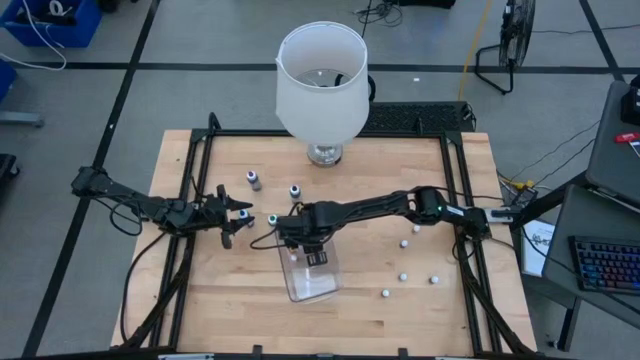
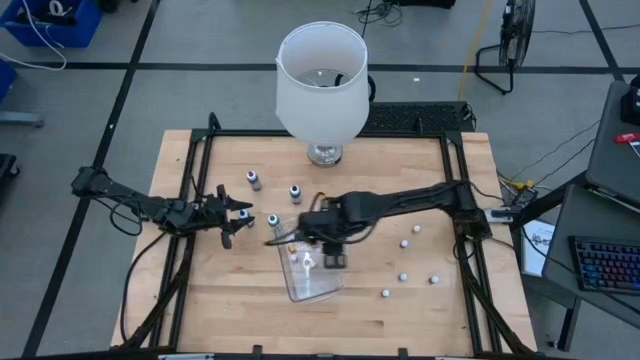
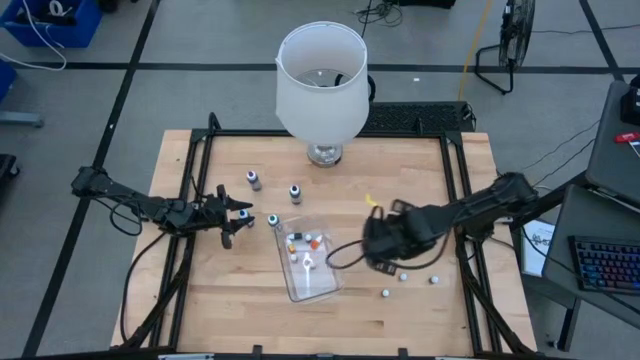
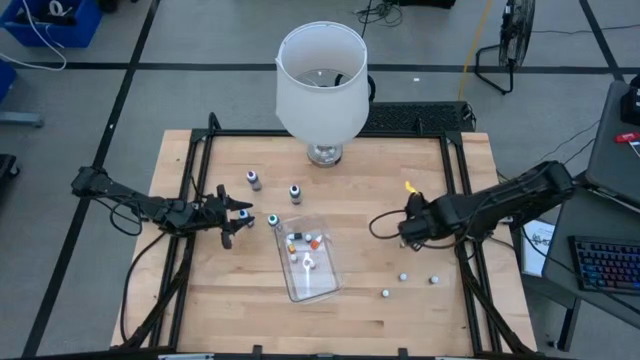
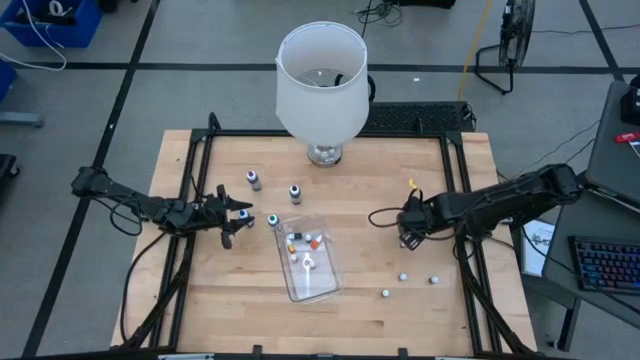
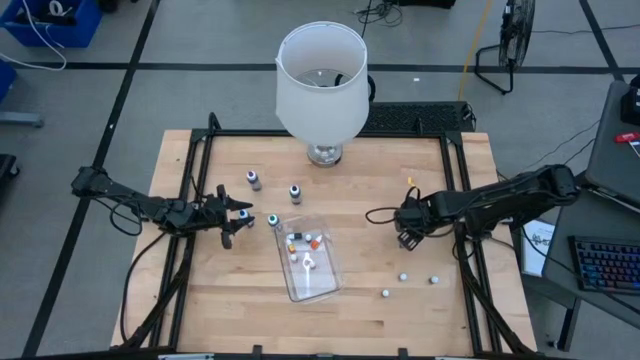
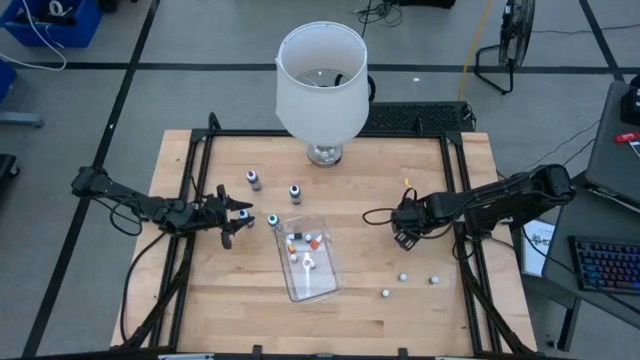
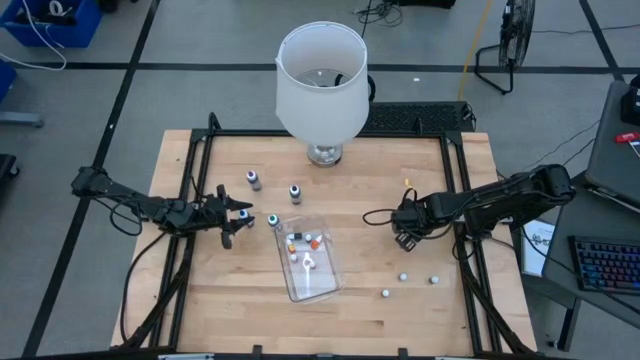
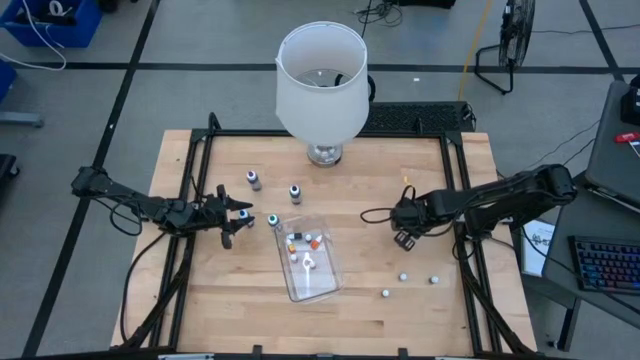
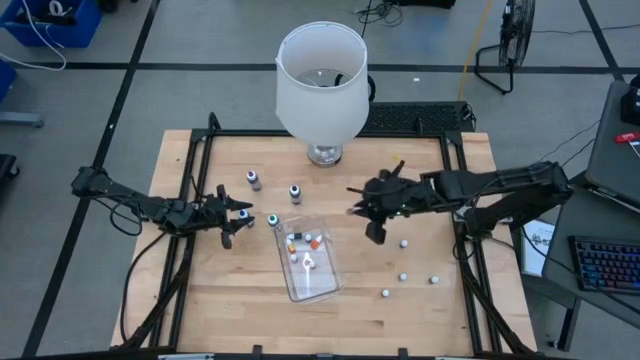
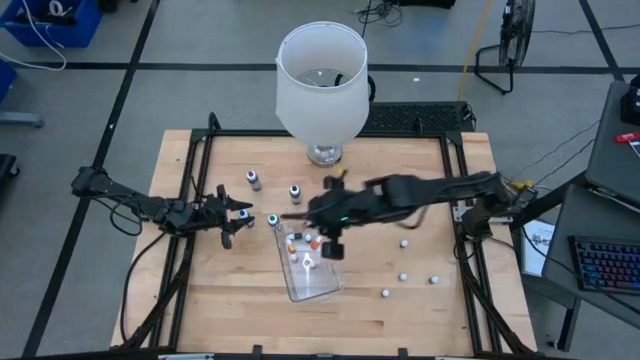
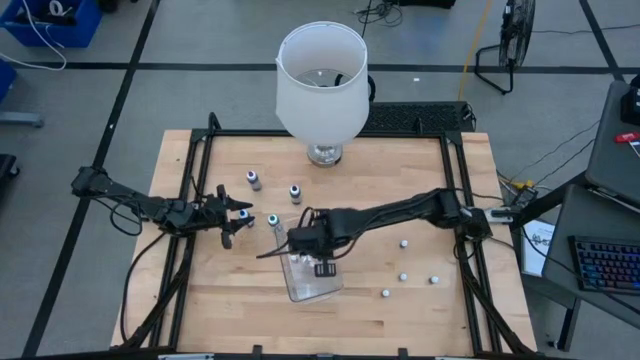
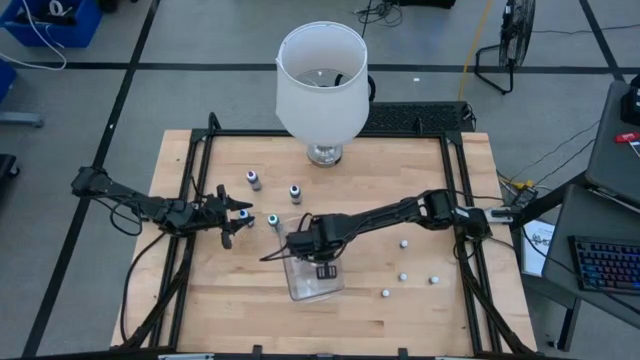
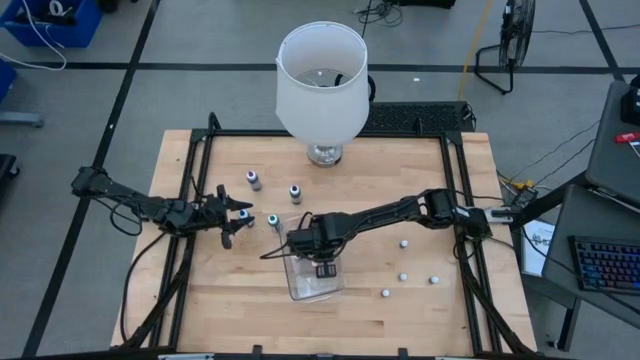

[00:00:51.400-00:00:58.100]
Task: Pick & Place food coloring
Put the orange food coloring bottle into the bin

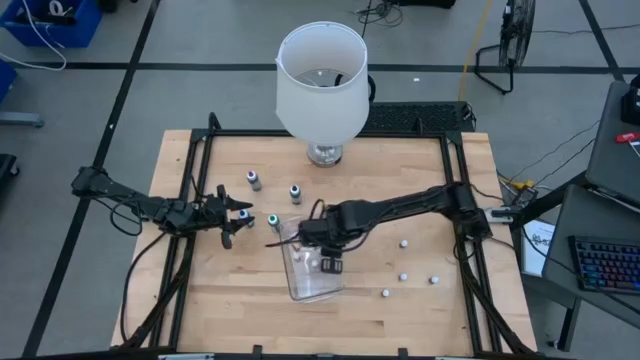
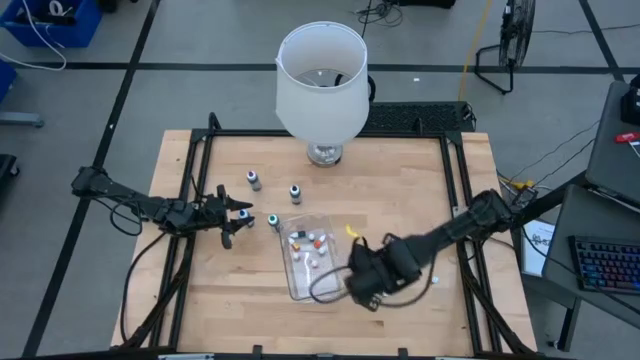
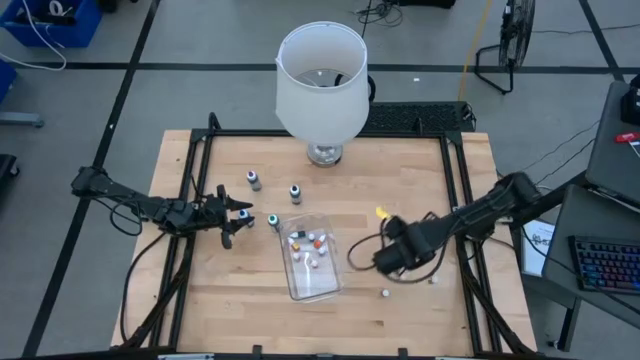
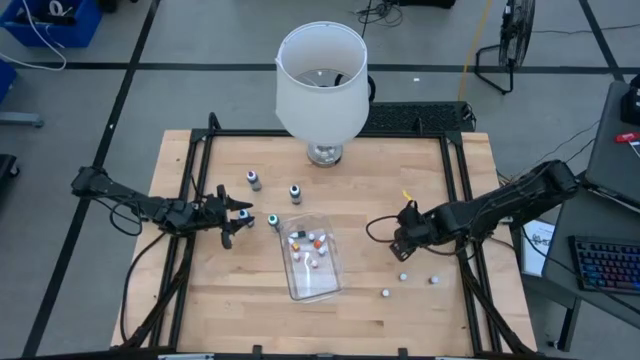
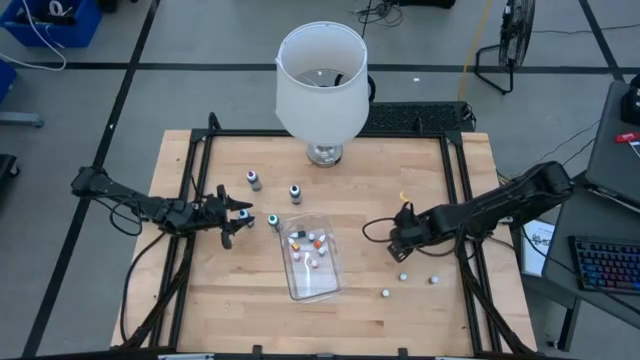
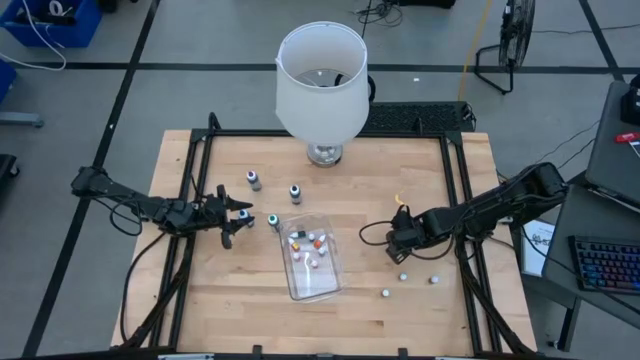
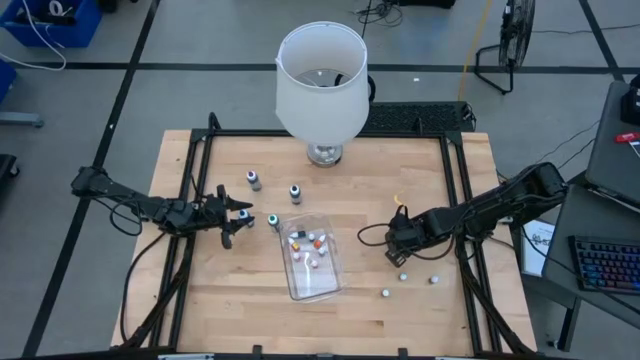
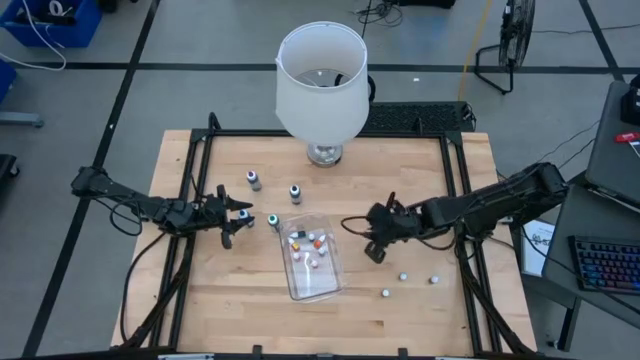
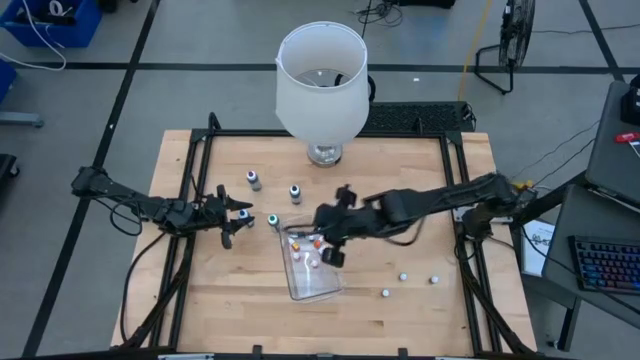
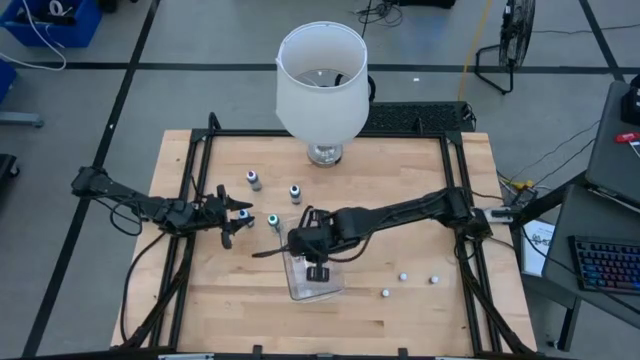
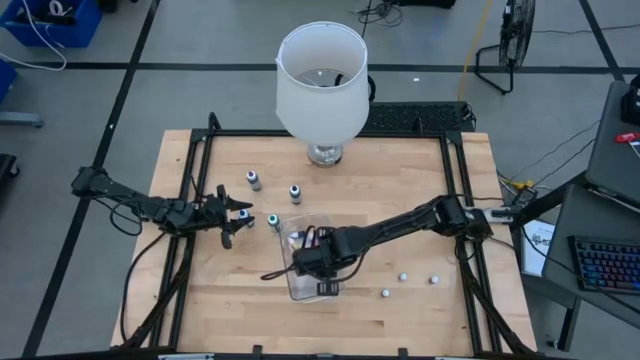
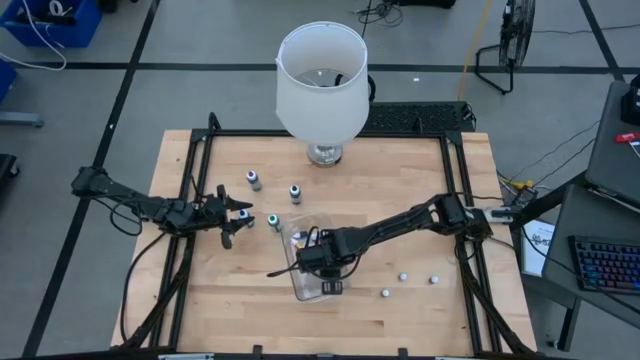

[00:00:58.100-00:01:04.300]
Put the violet food coloring bottle into the bin

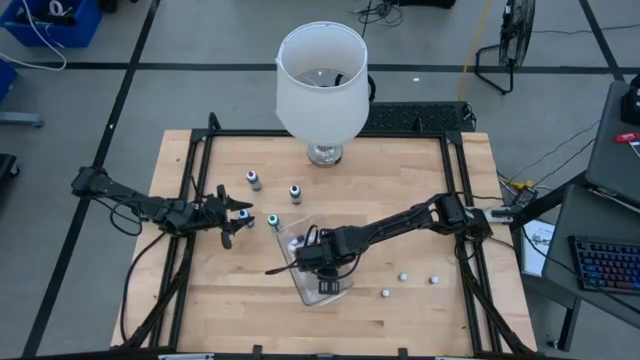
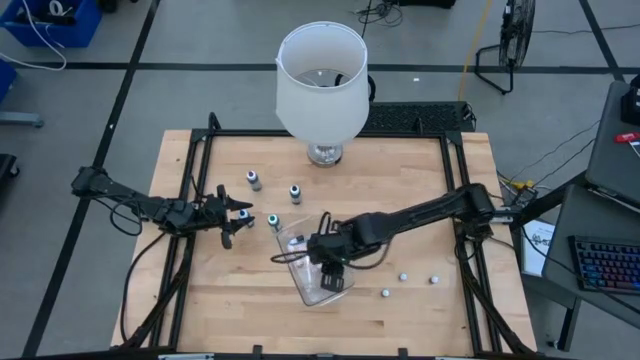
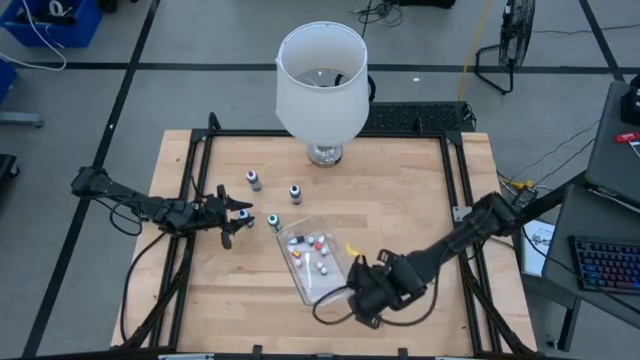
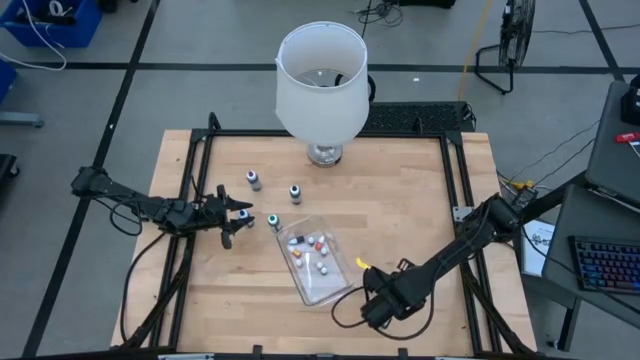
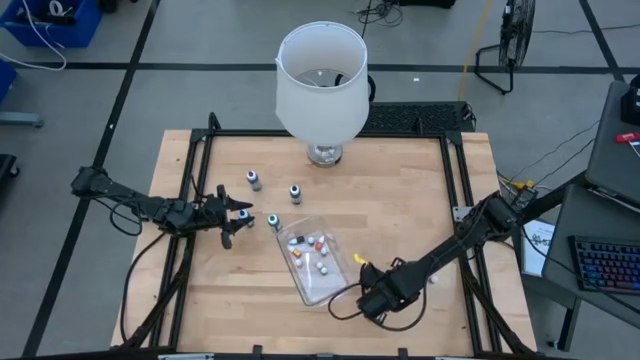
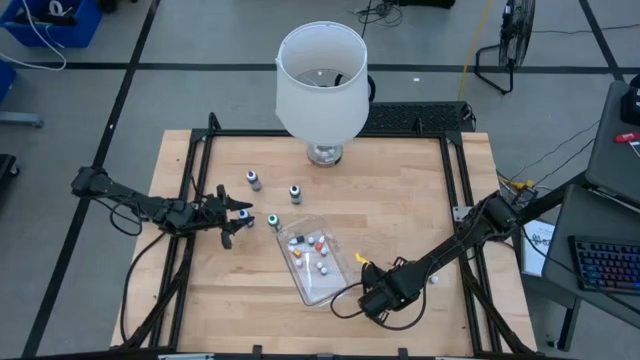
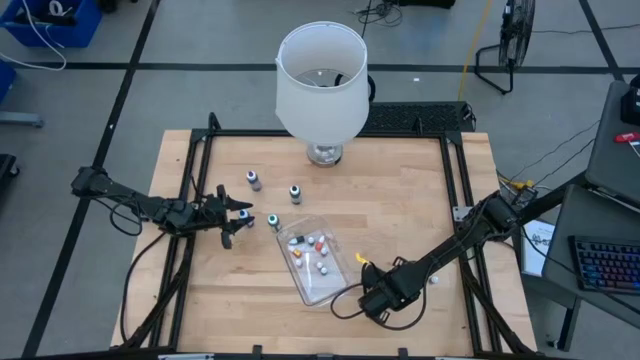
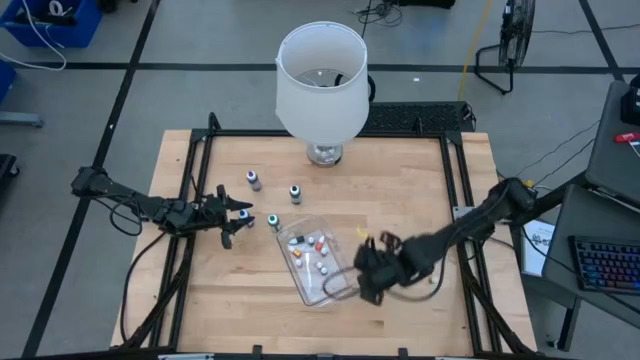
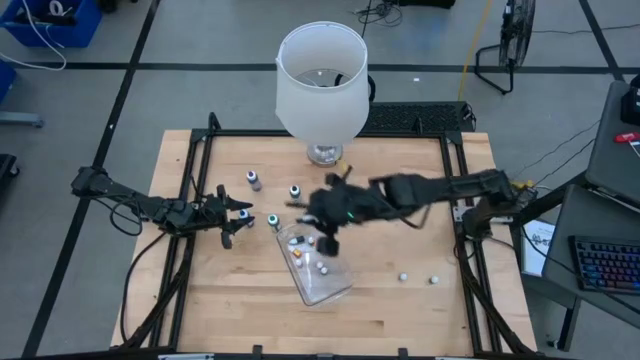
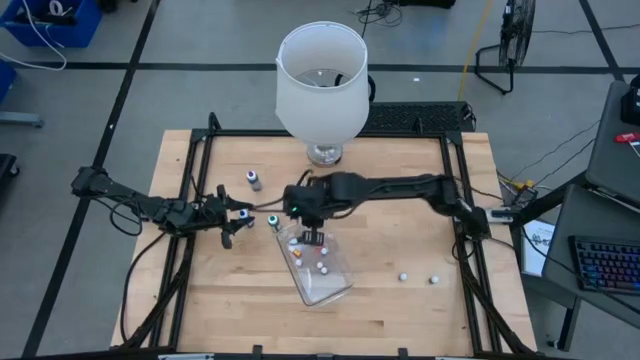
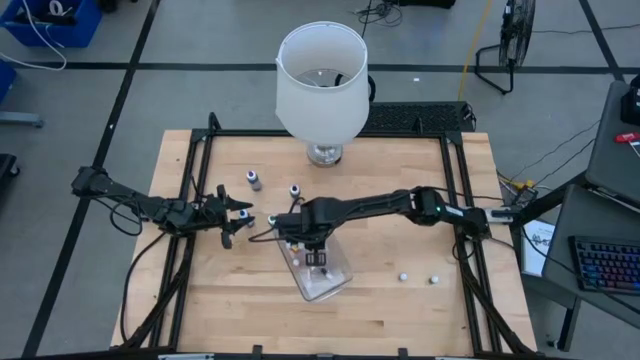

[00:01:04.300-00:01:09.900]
Put the green food coloring bottle into the bin

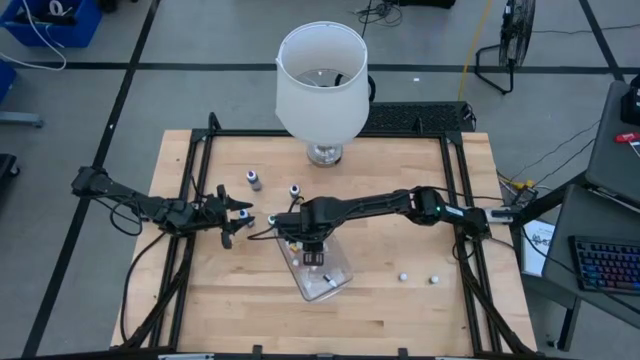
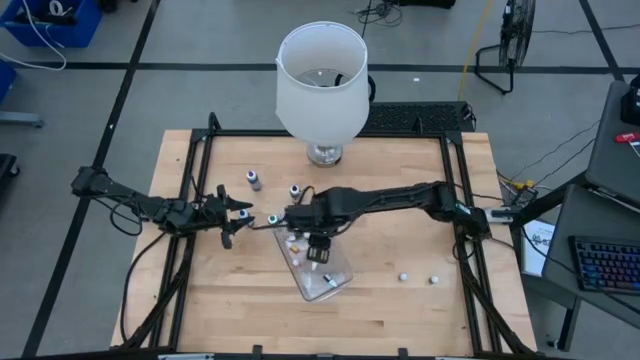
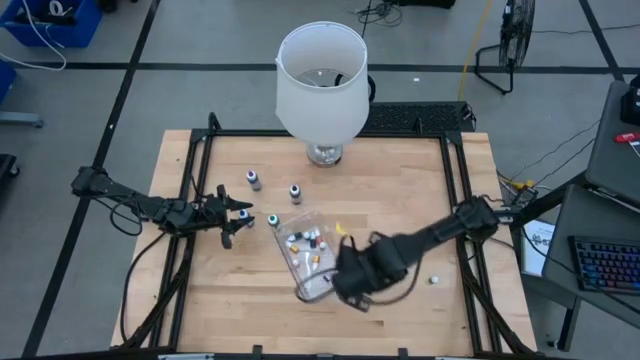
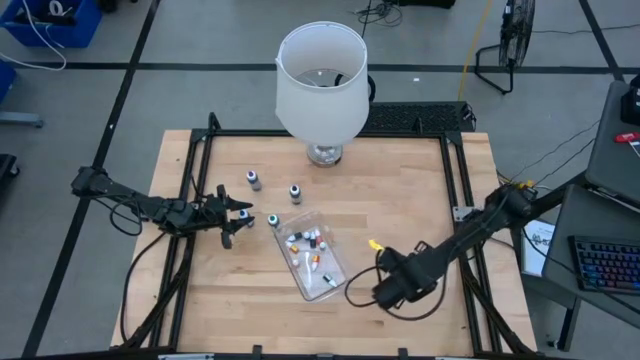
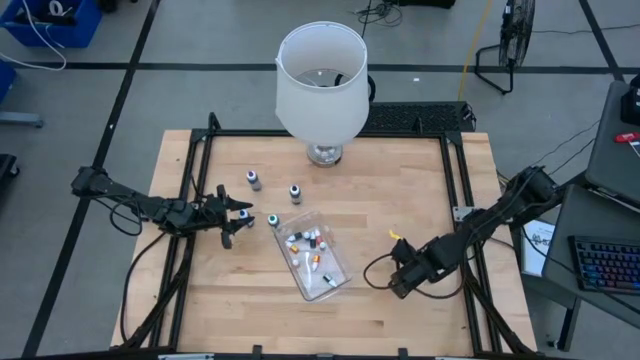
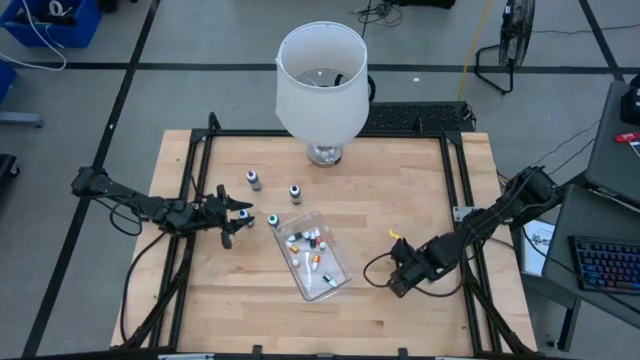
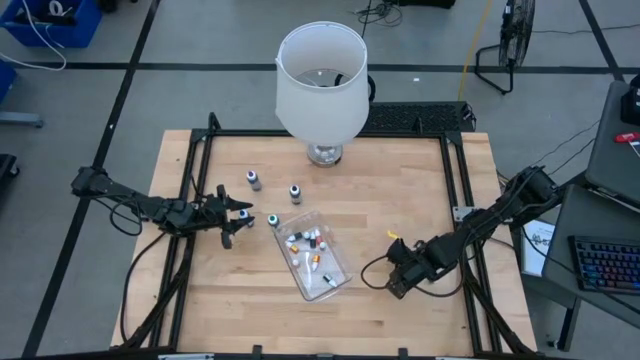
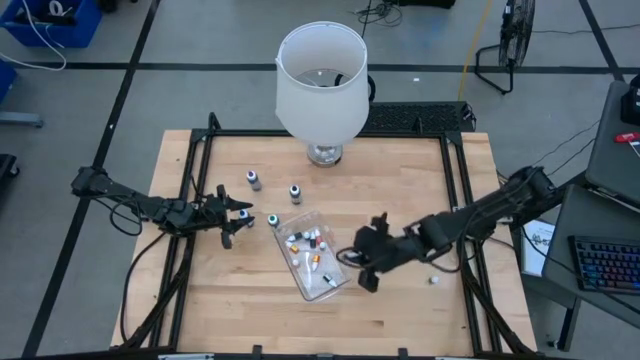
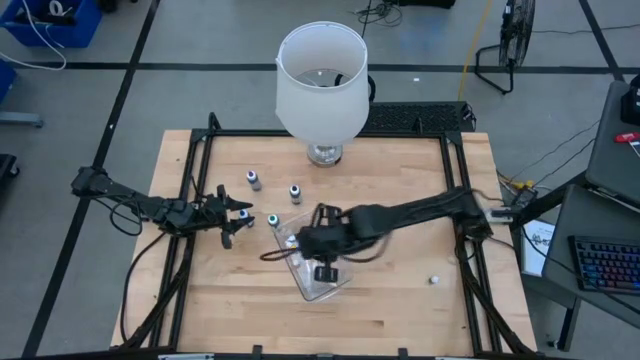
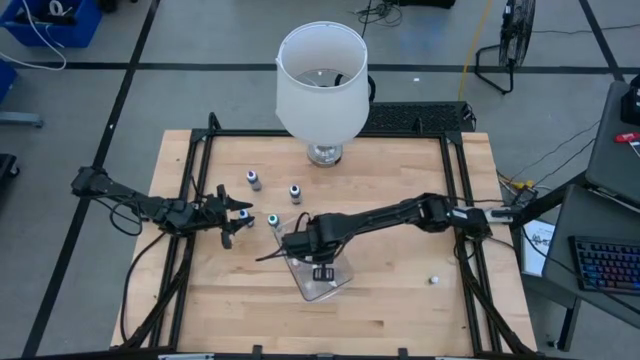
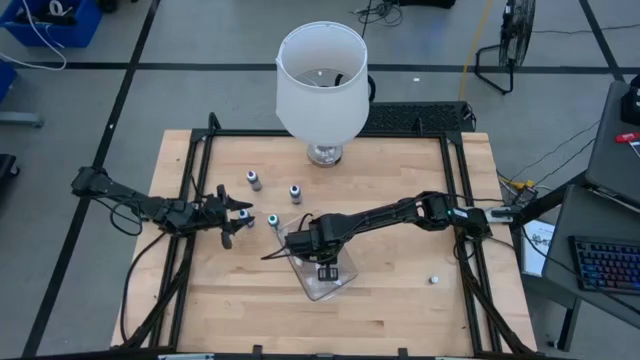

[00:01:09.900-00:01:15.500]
Put the blue food coloring bottle into the bin
